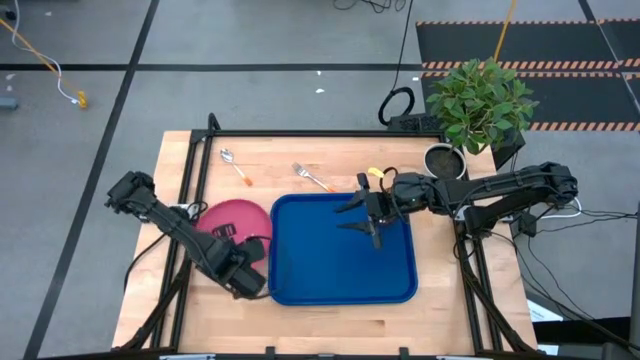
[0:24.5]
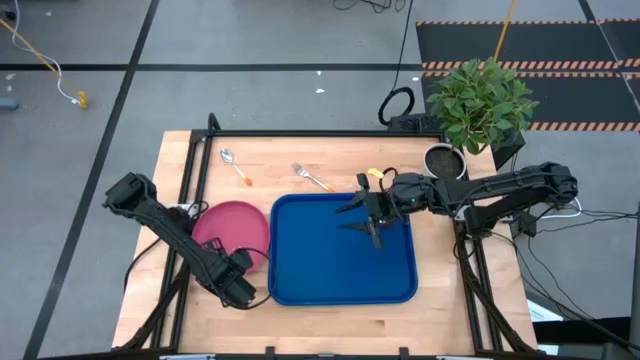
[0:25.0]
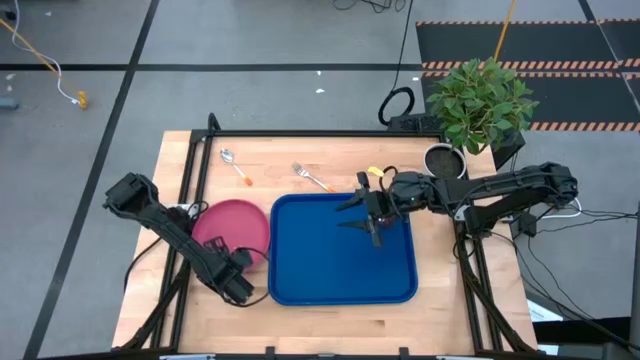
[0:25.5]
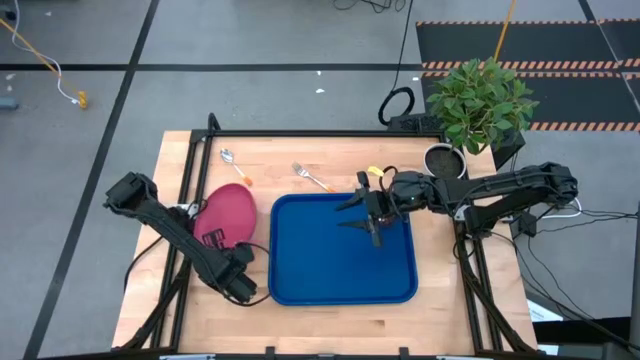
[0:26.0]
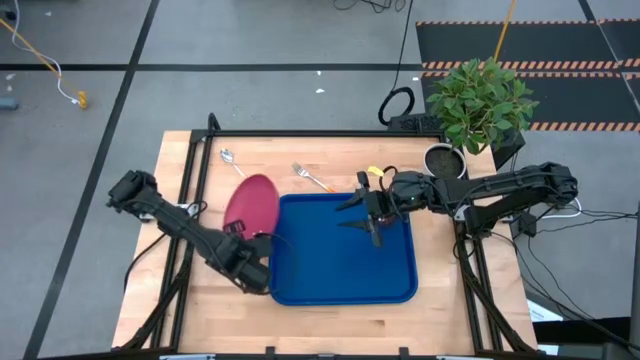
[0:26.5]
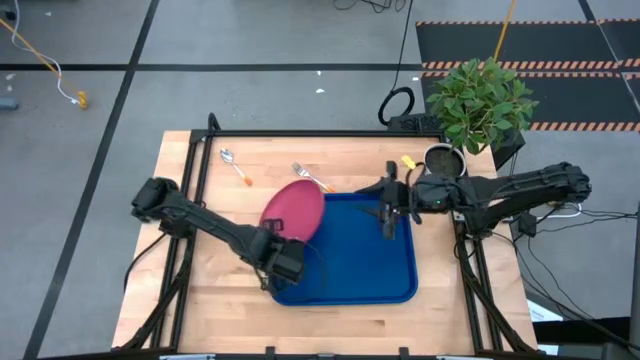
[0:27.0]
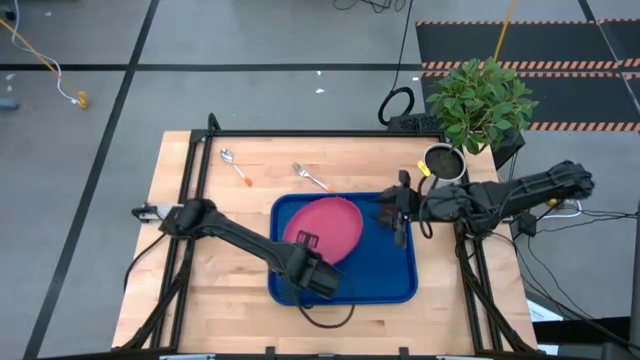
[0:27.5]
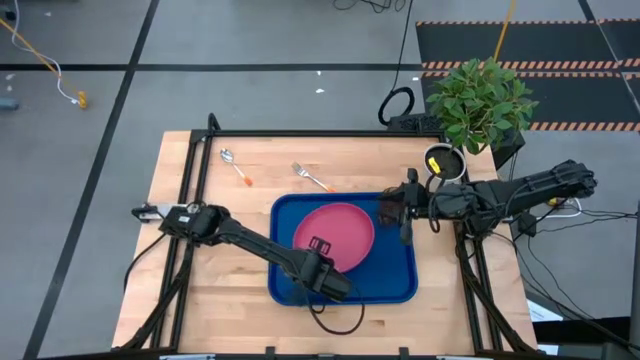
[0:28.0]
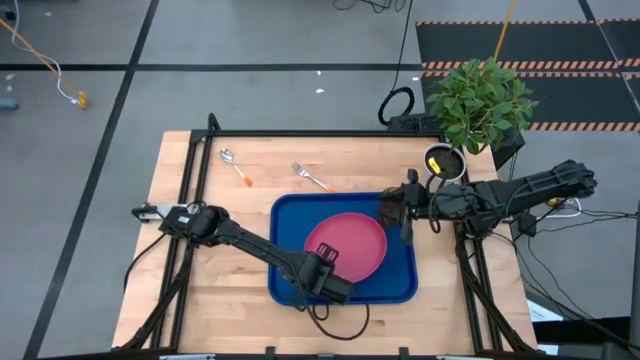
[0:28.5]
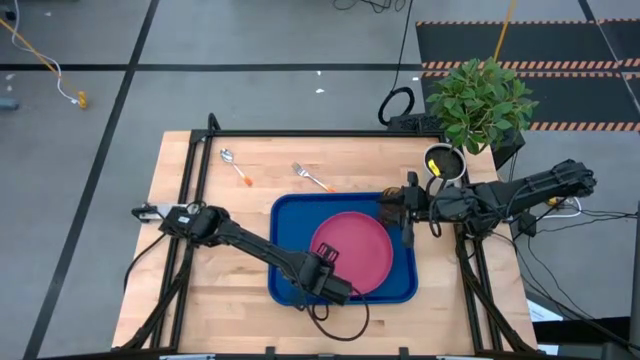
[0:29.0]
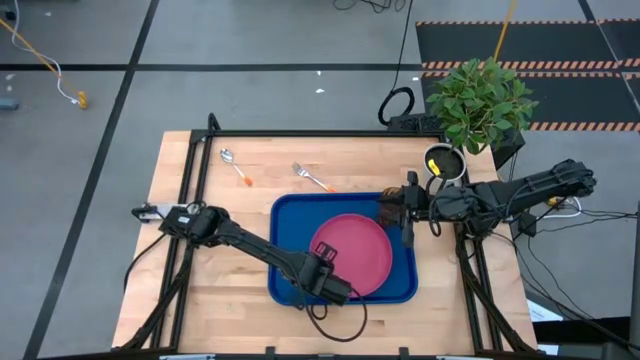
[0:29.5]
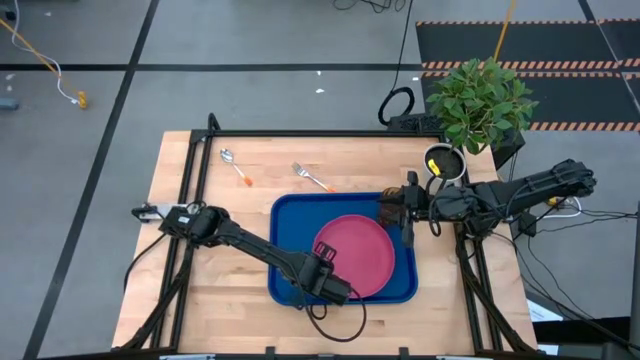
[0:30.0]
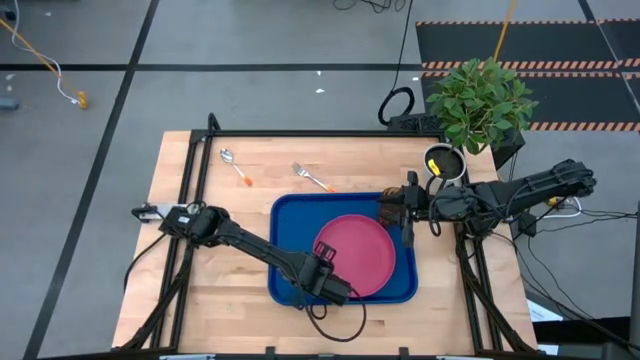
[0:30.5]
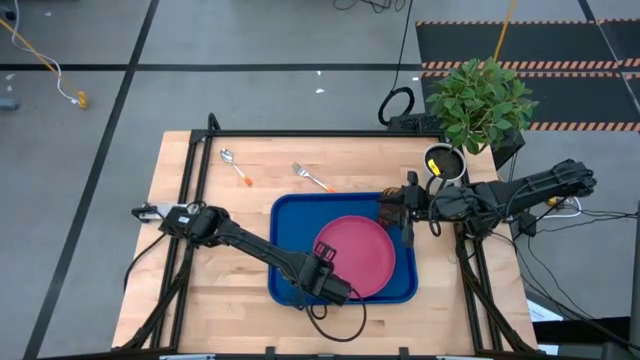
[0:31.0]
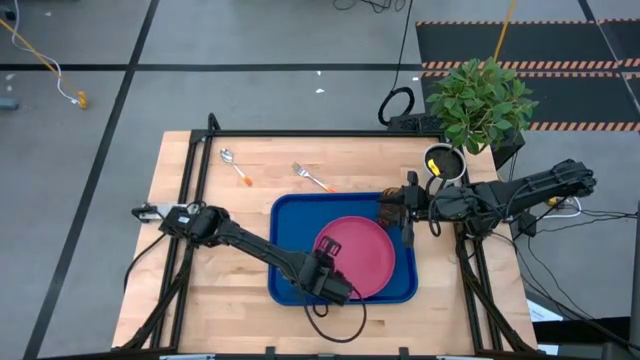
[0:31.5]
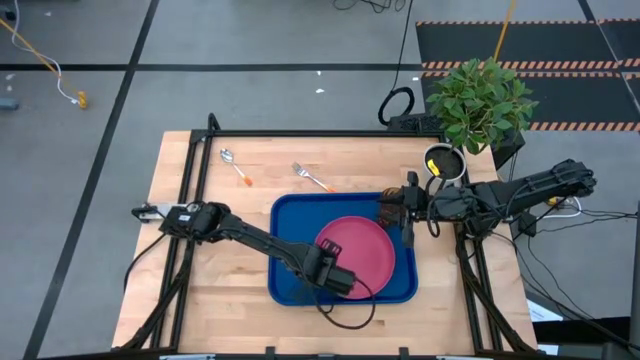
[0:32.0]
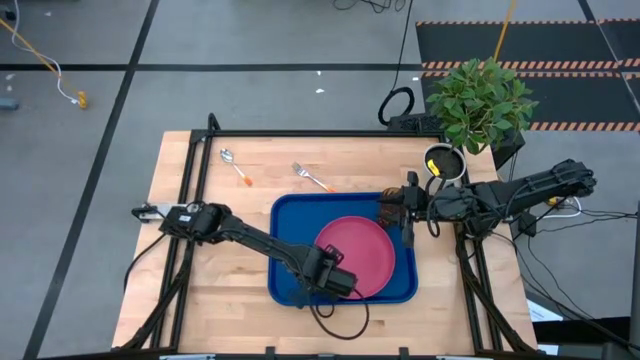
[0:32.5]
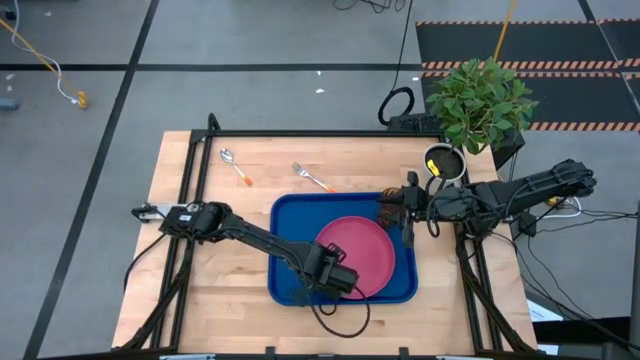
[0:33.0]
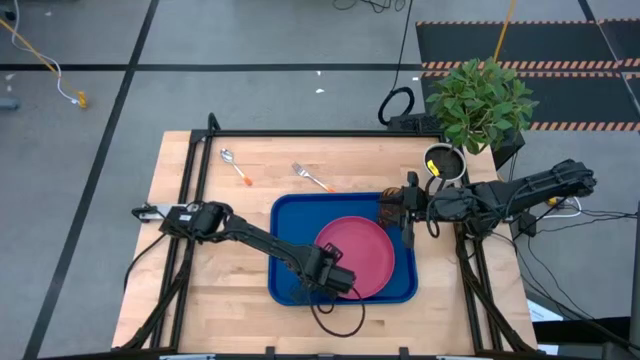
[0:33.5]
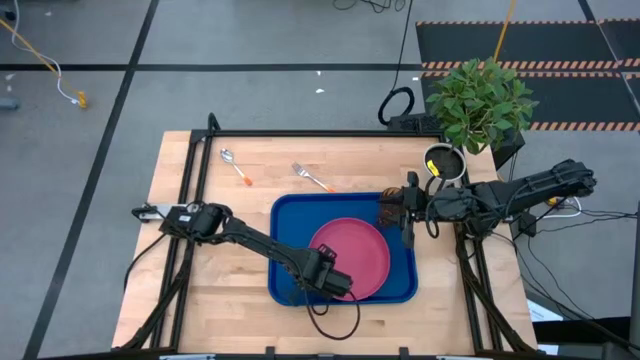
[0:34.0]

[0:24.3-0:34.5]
Task: Pick and place plate/cup/fork/spoon on tray
Put the pink plate on the blue tray to the bottom left of the brown cup

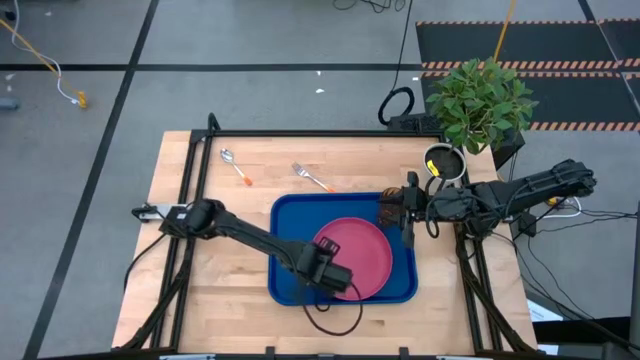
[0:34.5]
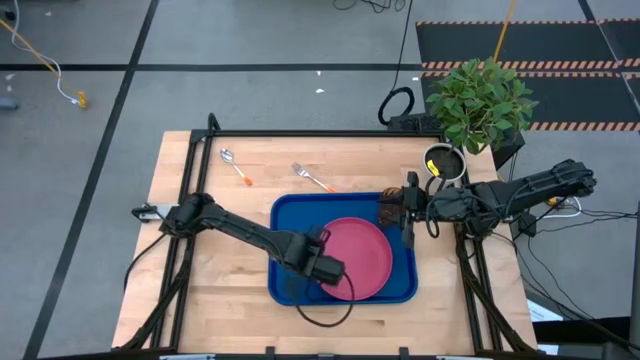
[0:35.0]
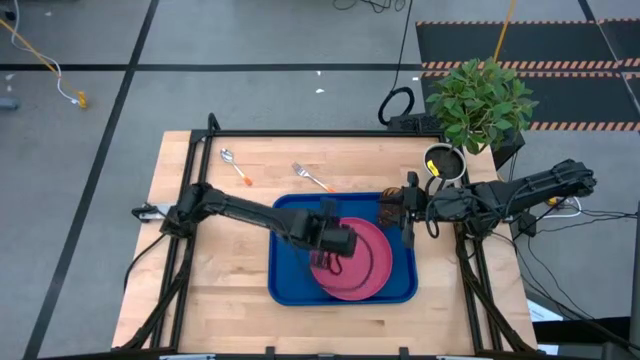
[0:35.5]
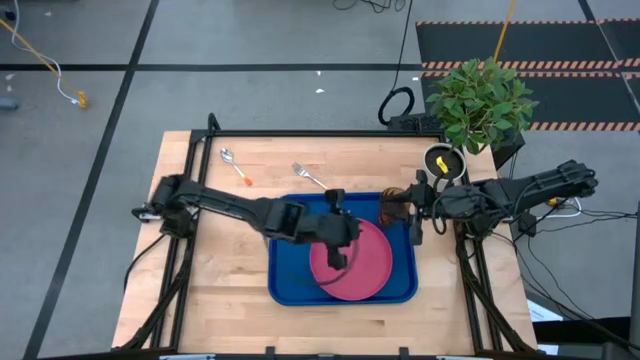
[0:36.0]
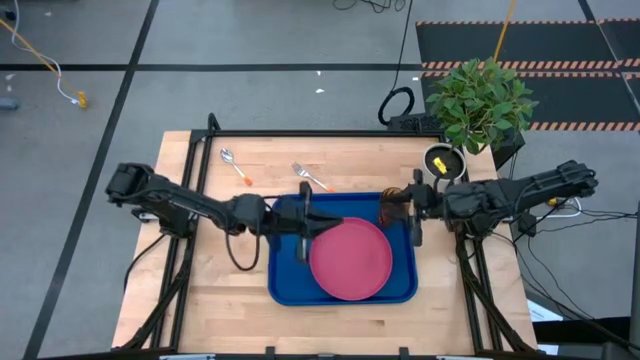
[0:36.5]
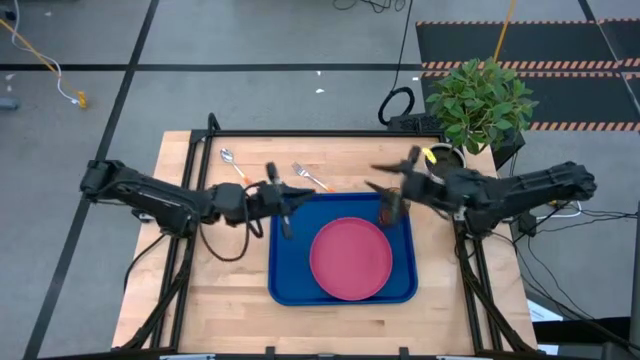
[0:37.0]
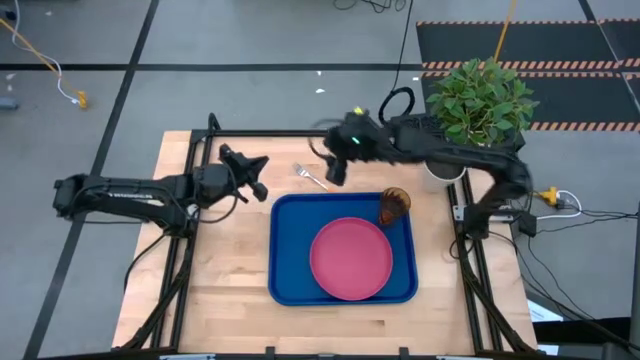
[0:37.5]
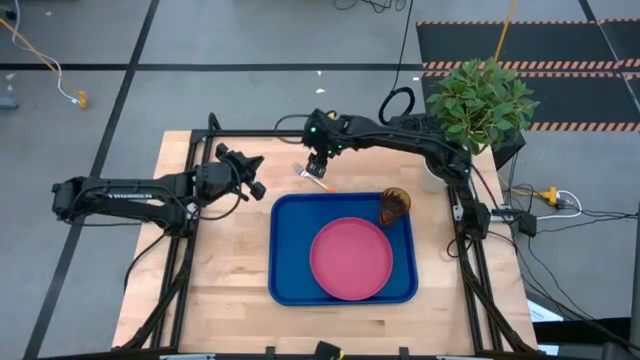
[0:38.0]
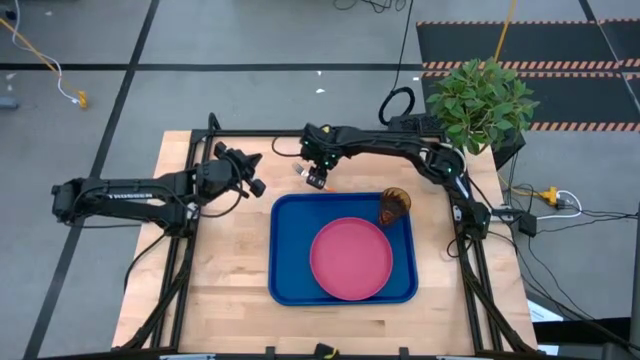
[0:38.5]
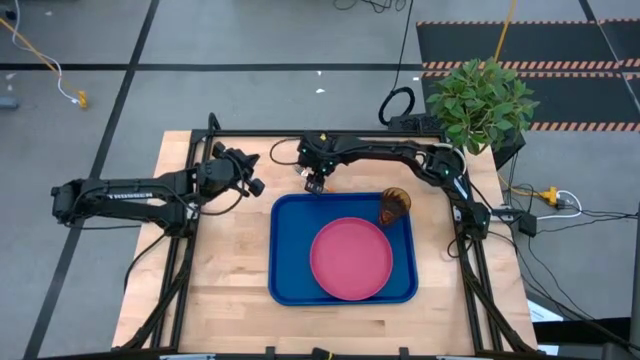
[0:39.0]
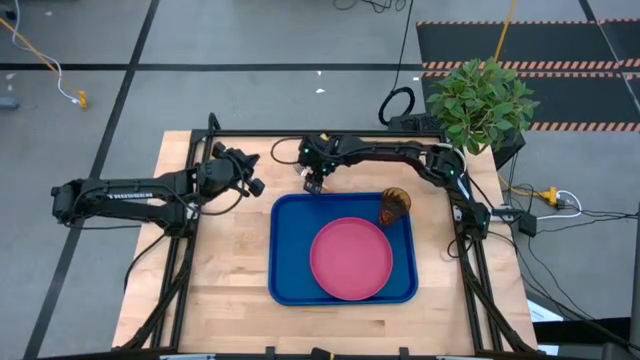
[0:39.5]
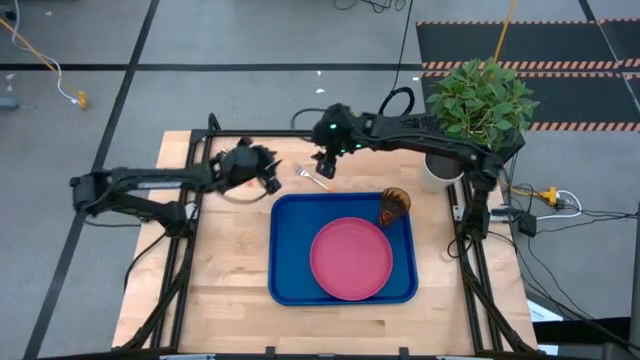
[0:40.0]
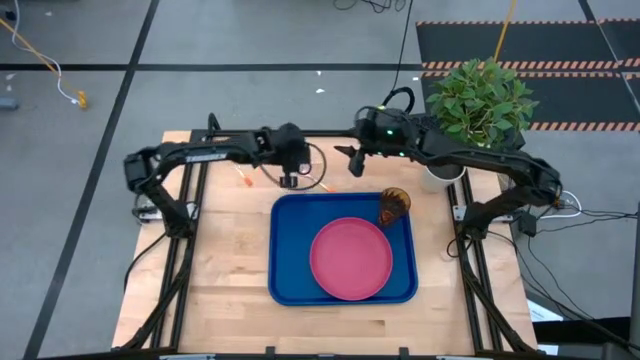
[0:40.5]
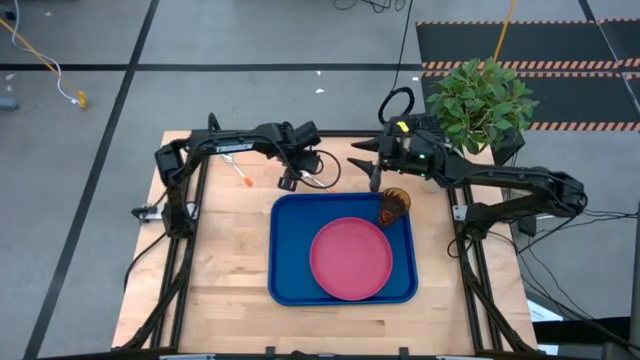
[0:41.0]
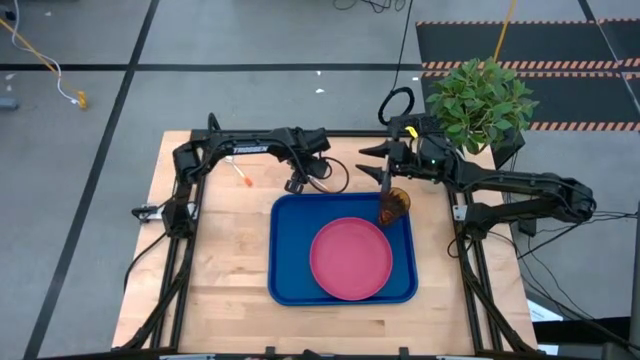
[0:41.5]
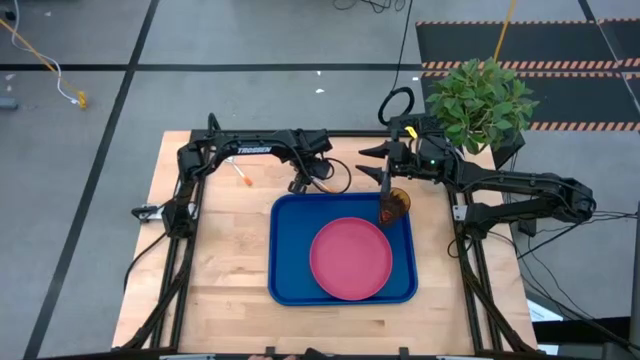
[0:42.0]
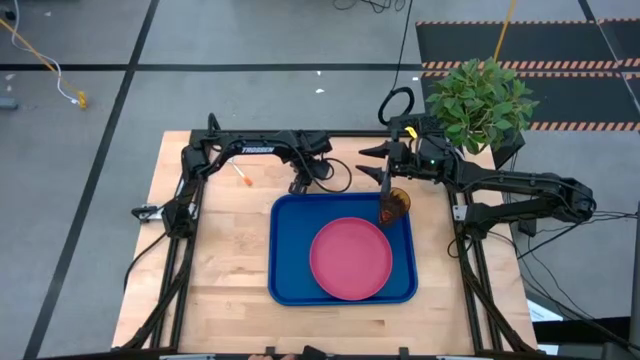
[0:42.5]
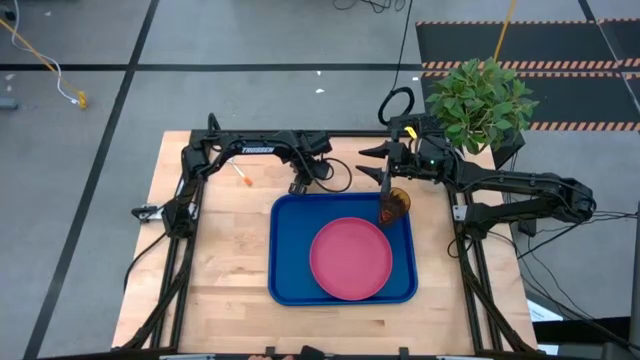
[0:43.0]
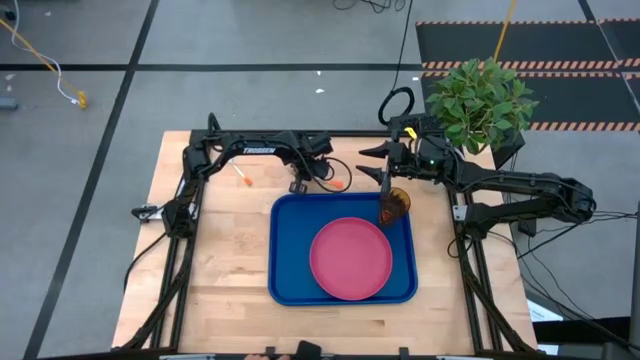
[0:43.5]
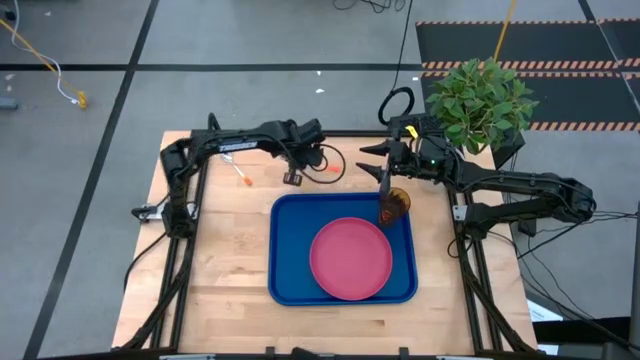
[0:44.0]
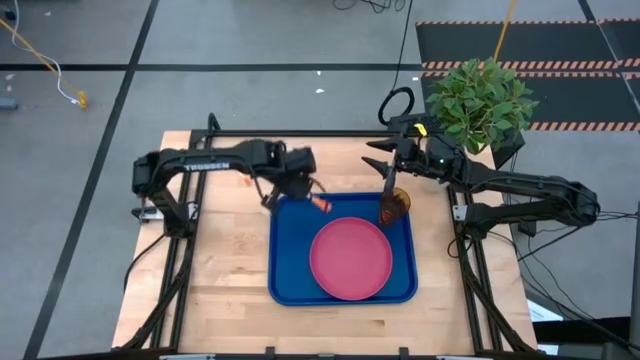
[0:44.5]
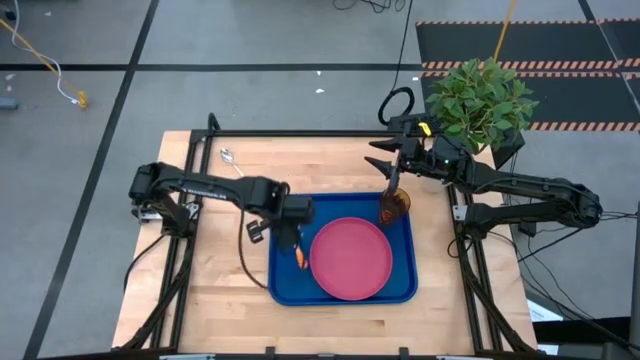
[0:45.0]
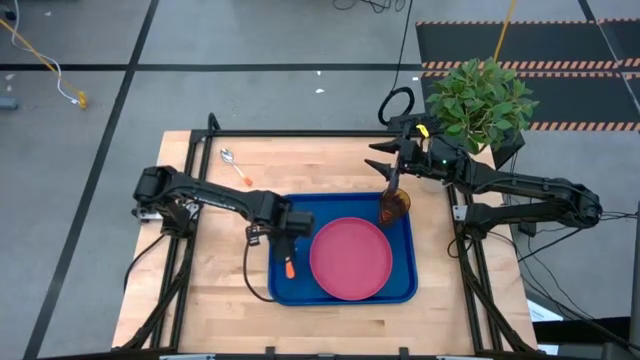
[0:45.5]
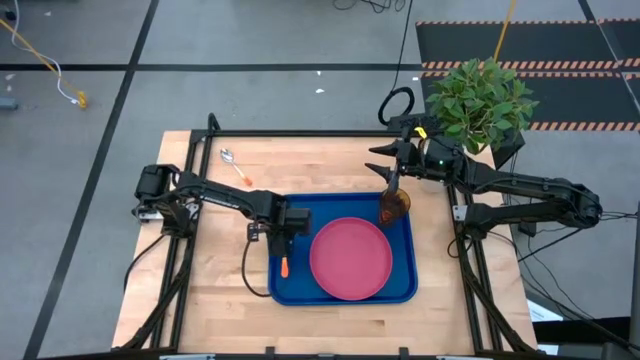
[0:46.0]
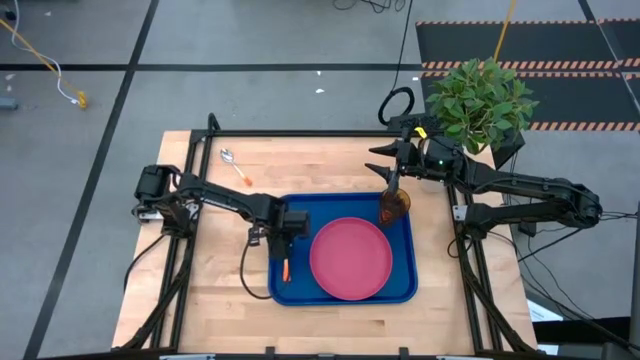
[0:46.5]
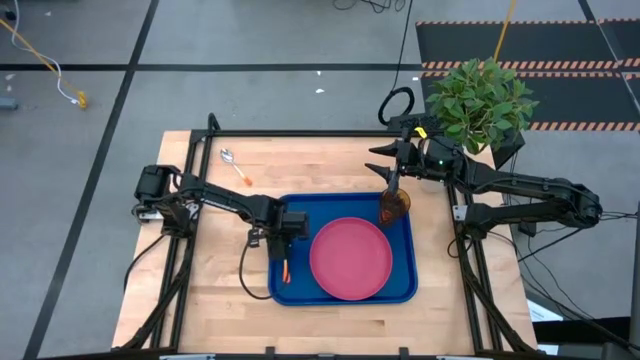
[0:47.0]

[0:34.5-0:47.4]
Put the orange fork on the blue tray to the left of the pink plate
